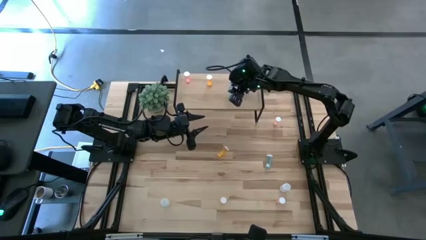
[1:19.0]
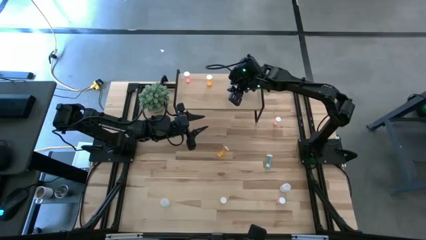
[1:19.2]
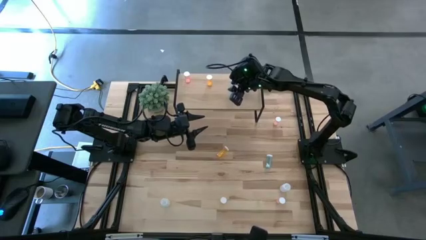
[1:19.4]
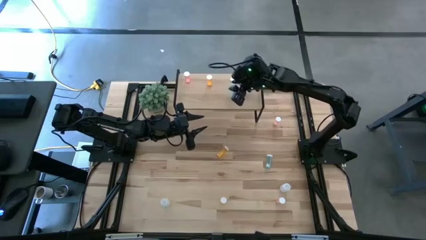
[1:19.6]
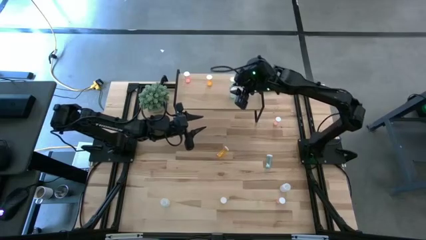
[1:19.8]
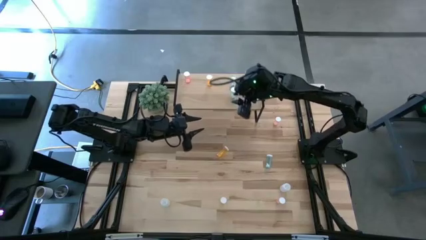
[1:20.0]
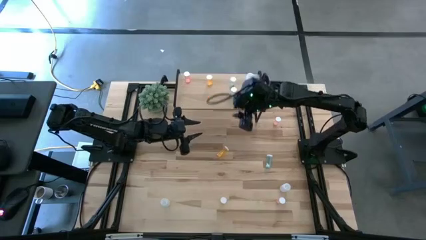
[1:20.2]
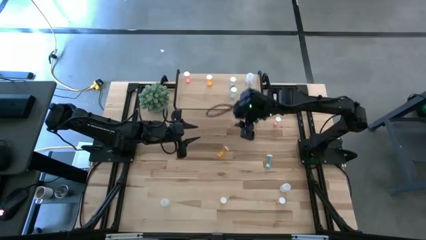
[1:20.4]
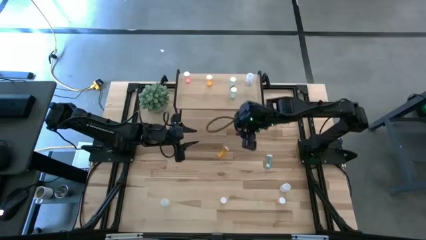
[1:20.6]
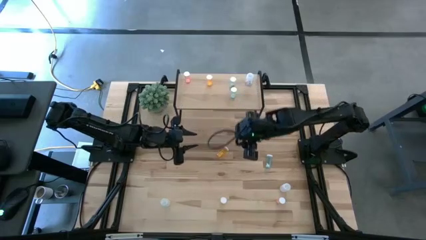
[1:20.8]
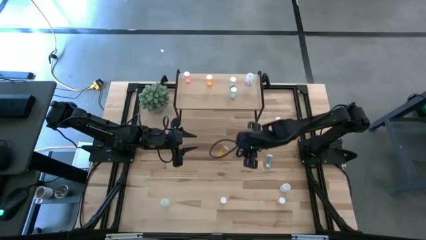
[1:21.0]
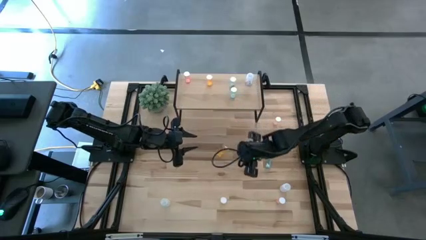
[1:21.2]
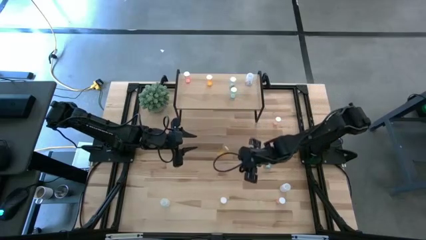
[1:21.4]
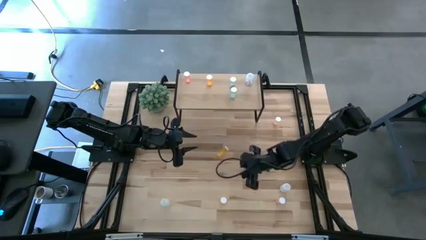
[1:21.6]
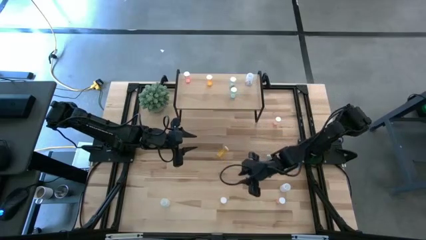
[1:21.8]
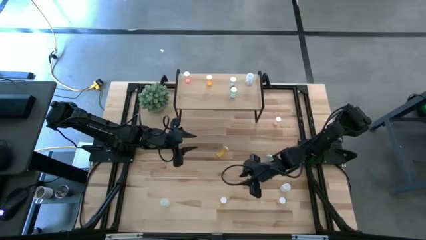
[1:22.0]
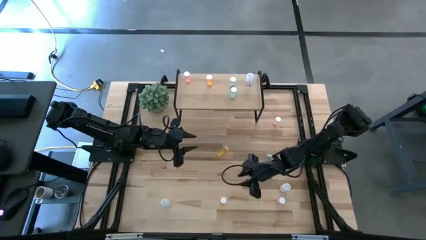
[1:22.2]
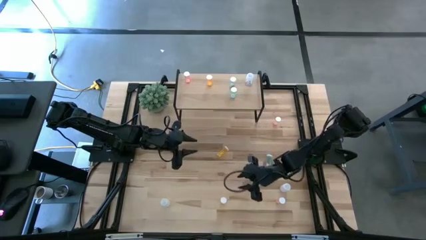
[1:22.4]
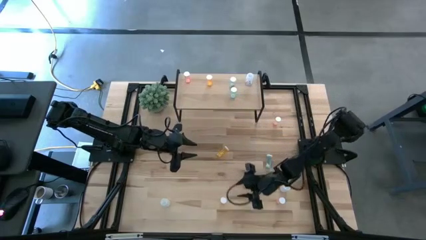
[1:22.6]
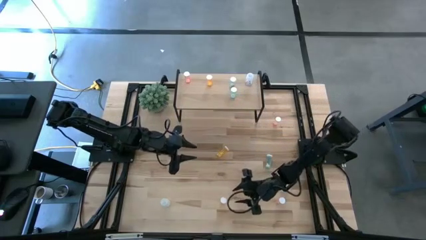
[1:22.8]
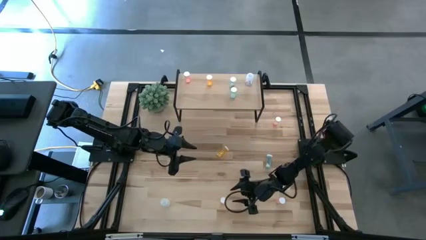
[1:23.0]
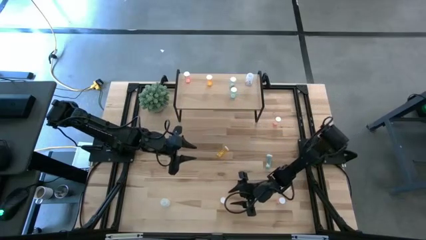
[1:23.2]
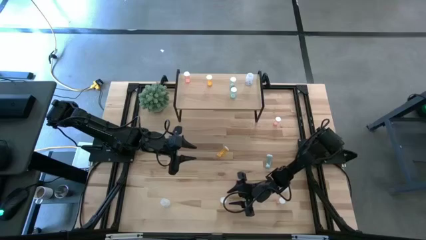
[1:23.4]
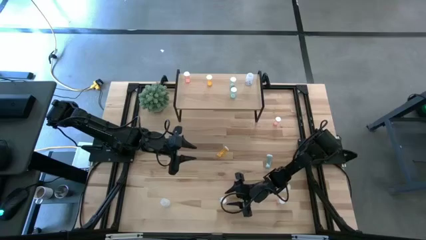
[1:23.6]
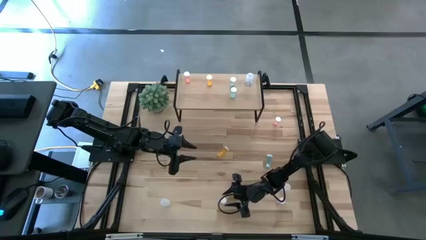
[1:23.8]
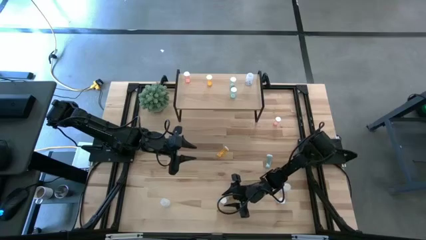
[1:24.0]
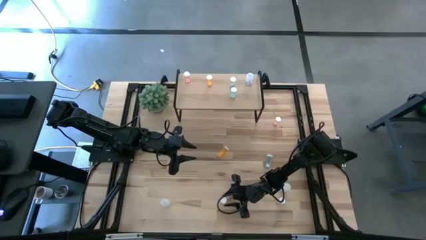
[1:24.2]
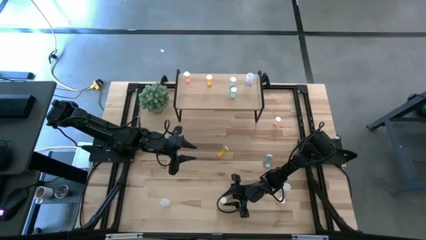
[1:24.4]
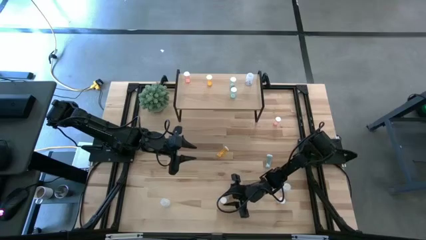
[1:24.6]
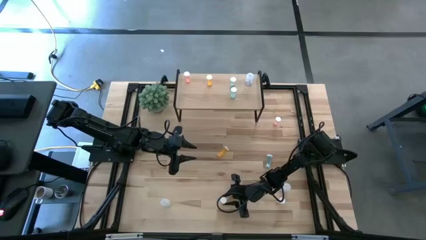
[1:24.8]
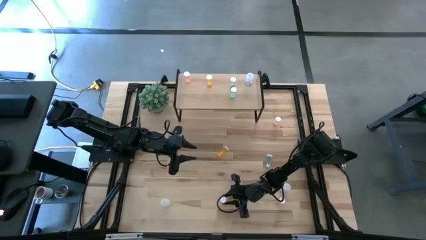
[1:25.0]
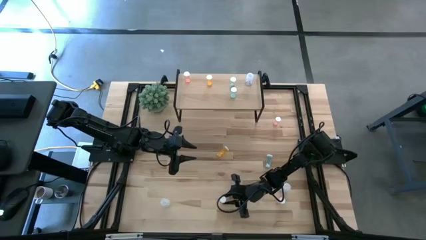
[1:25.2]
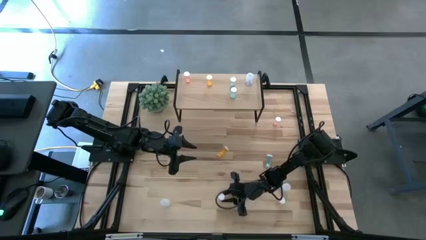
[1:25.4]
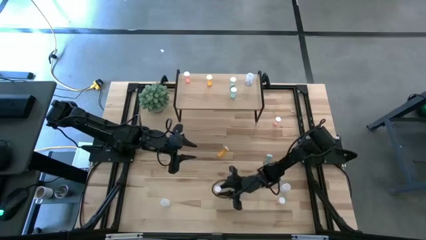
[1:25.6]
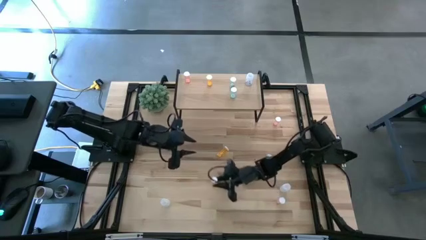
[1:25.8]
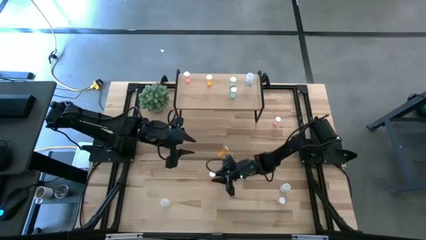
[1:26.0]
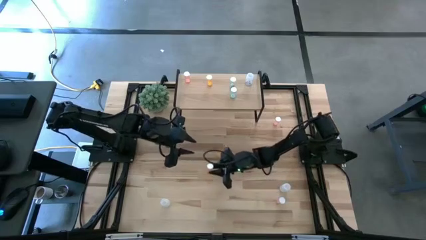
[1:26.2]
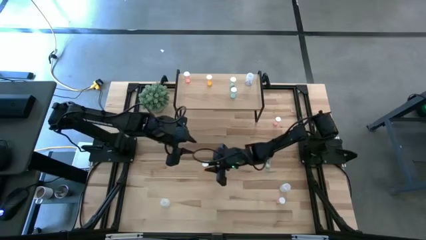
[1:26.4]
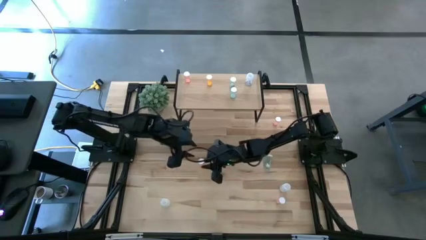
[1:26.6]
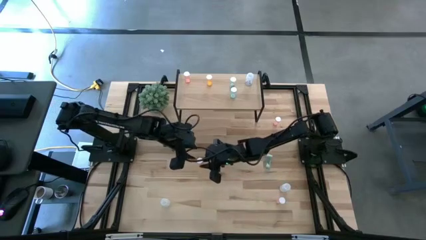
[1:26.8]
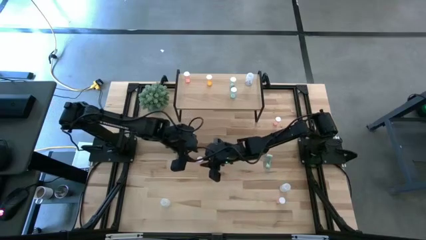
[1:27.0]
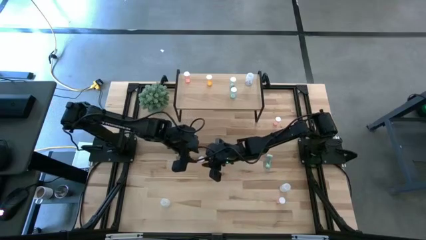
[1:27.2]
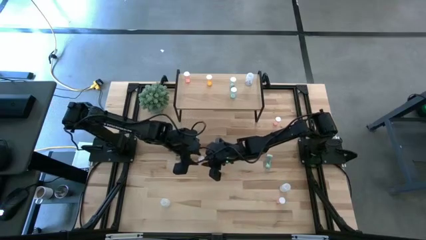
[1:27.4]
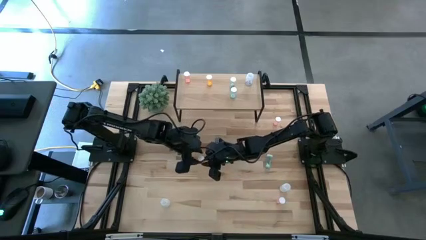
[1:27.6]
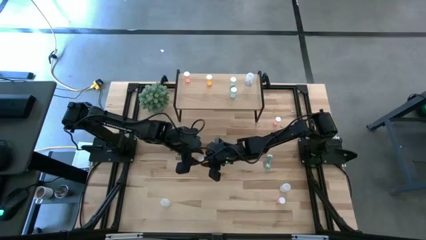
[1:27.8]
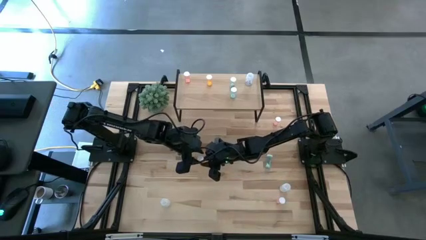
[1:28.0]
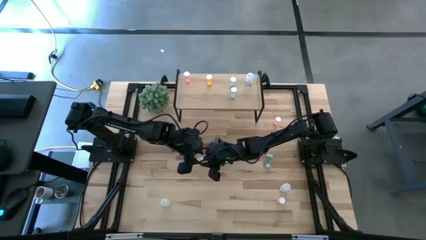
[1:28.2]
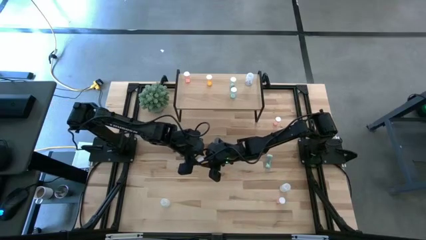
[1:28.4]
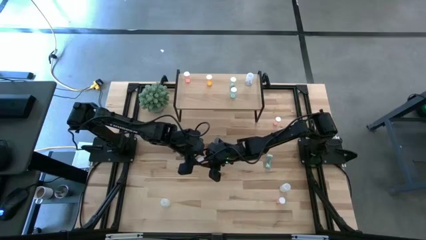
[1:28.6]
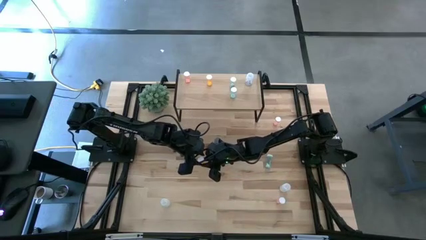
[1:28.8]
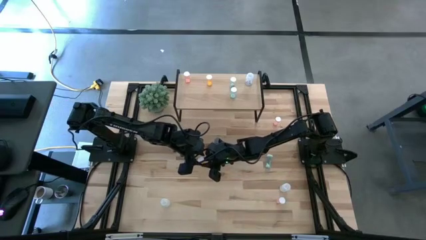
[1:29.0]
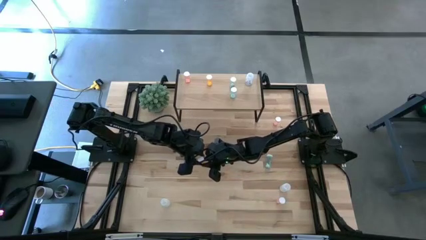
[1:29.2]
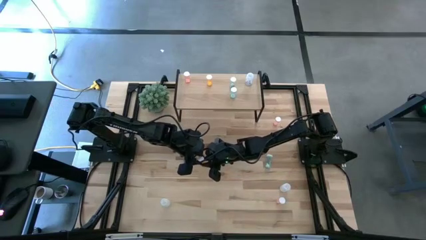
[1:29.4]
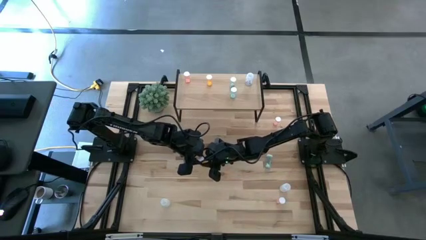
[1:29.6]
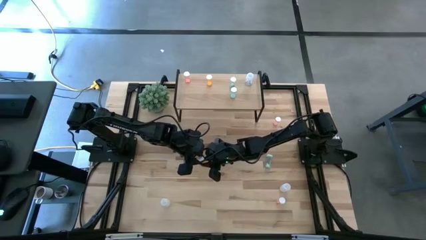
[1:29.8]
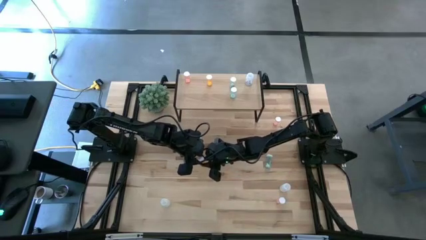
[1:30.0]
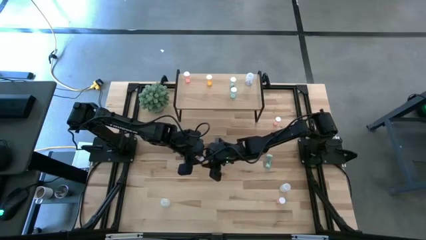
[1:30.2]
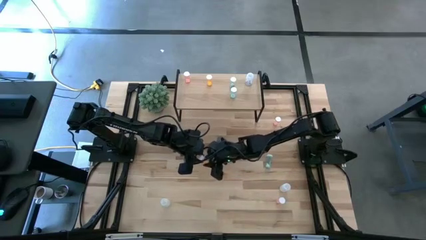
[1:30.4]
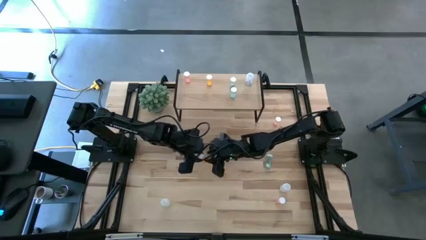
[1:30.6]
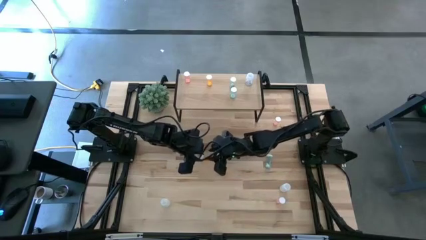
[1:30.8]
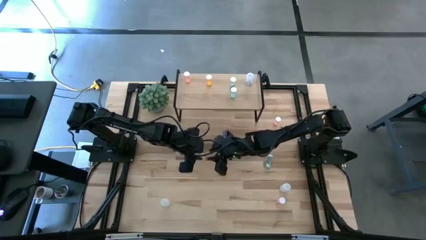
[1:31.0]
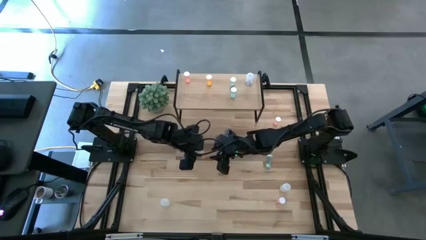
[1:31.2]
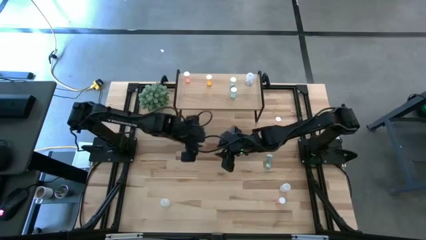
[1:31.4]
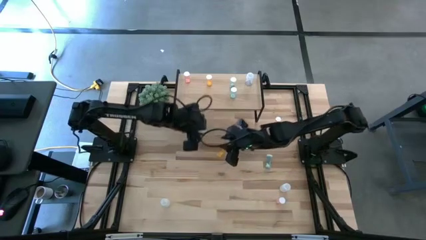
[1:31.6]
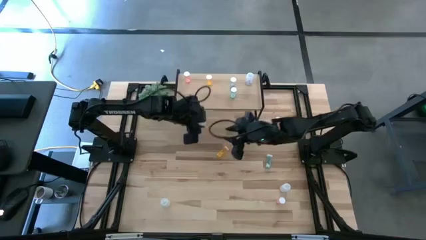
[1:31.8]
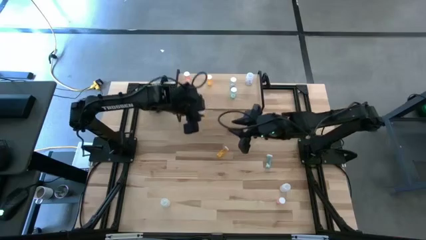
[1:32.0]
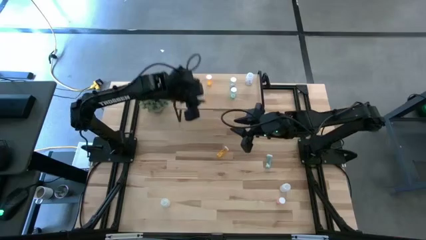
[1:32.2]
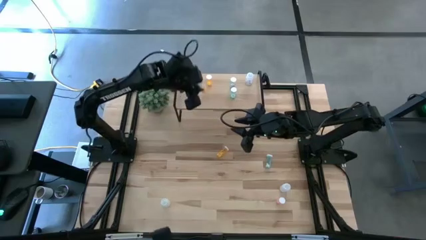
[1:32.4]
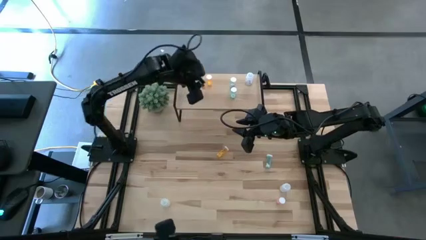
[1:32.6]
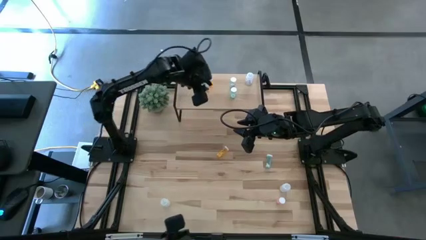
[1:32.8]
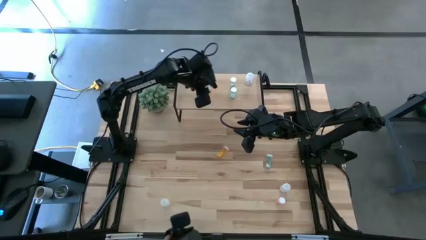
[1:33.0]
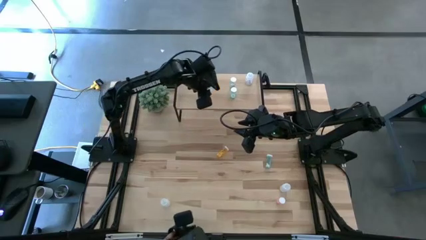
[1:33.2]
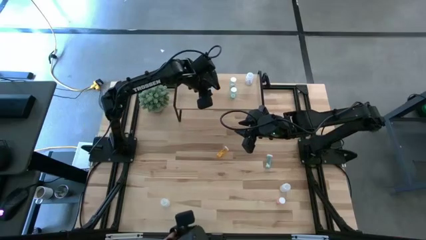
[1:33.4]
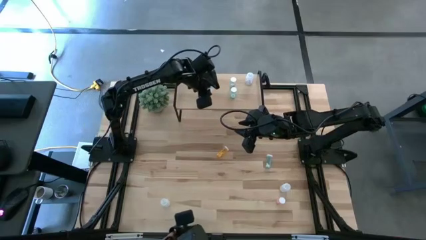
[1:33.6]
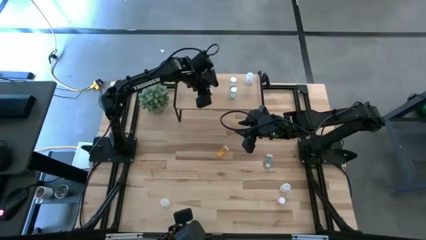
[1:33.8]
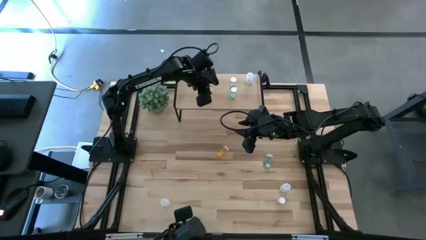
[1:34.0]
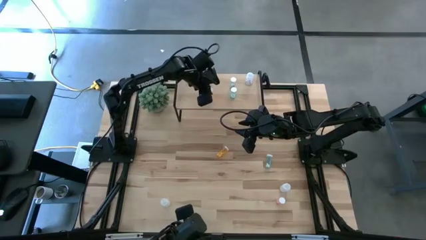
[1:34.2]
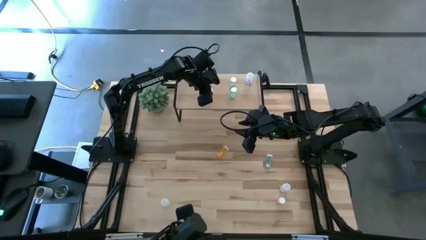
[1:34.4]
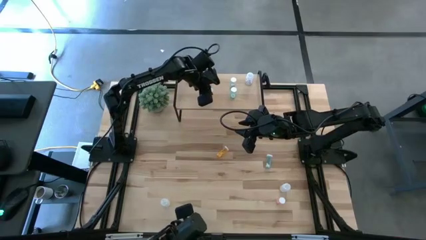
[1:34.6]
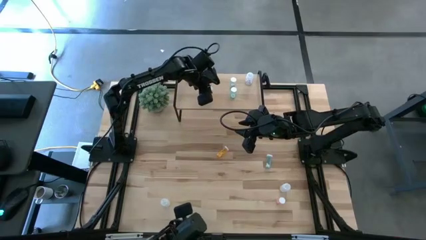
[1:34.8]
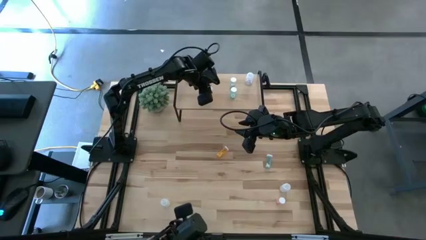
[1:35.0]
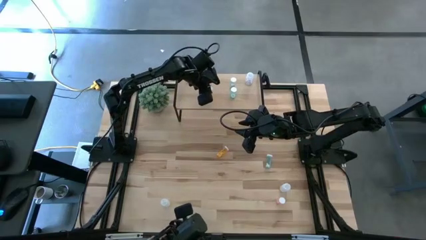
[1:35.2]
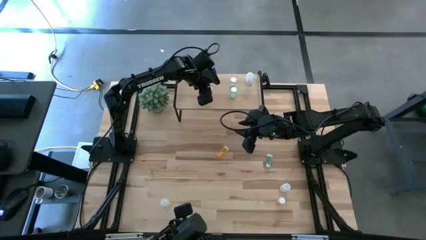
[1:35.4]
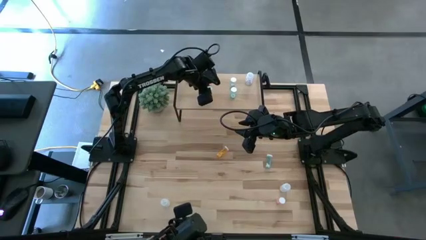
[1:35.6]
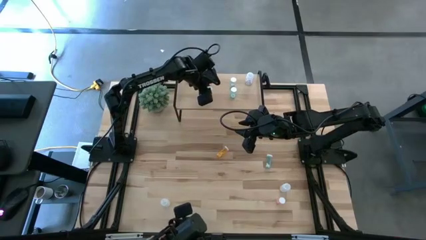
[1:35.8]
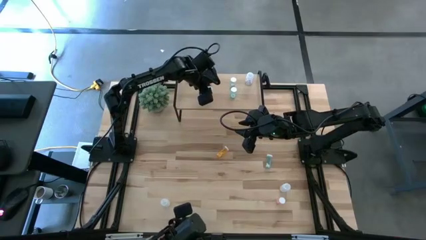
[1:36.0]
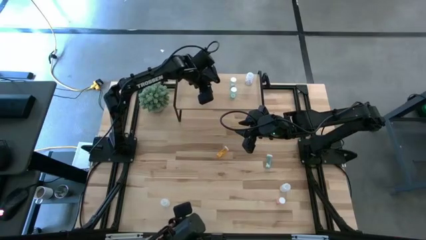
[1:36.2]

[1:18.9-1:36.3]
Task: Pick and place medicine bottles onto shelf by color
Put the bottom orange pill bottle on the shelf aligned with the other orange pill bottle
